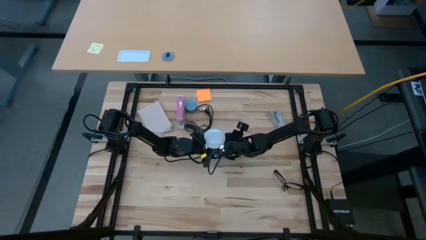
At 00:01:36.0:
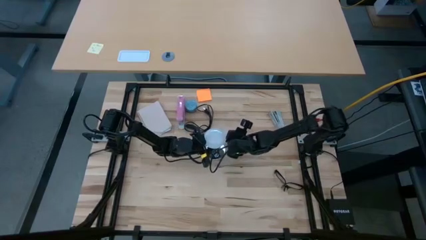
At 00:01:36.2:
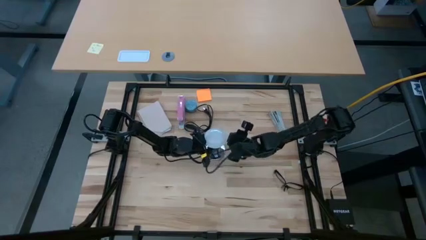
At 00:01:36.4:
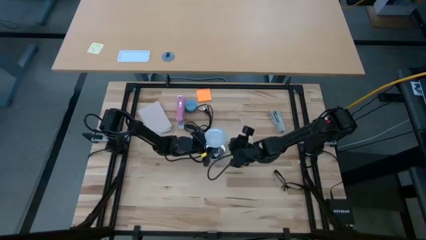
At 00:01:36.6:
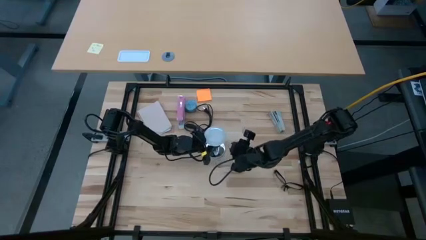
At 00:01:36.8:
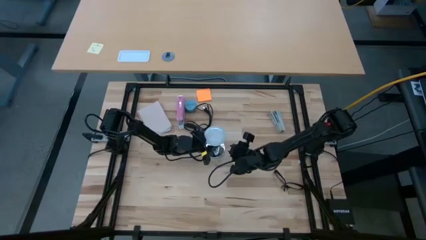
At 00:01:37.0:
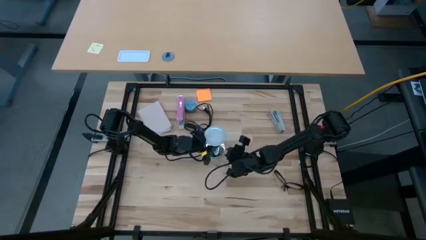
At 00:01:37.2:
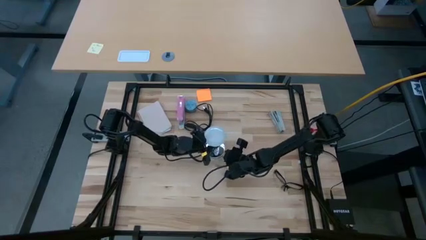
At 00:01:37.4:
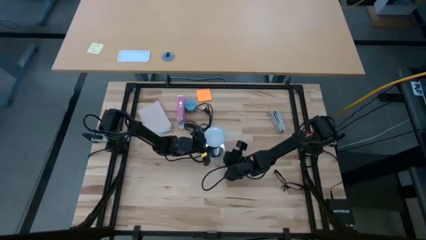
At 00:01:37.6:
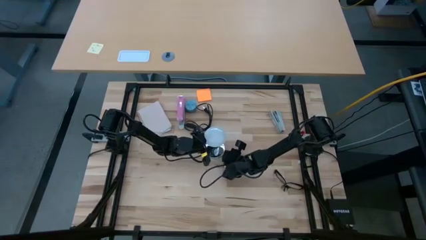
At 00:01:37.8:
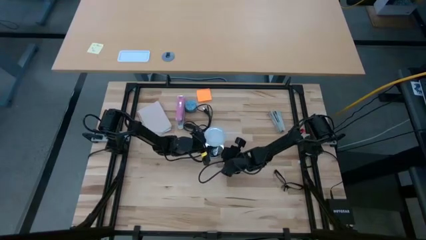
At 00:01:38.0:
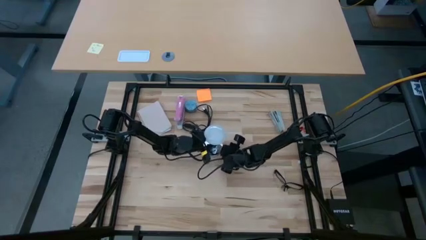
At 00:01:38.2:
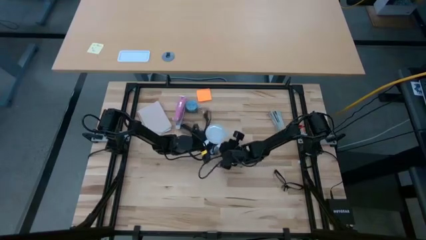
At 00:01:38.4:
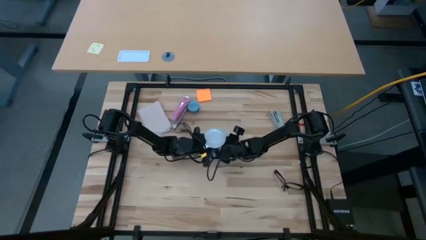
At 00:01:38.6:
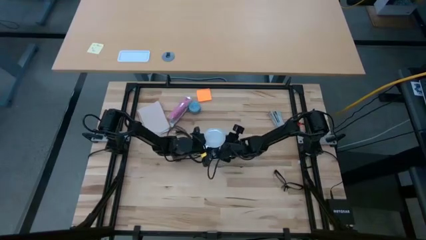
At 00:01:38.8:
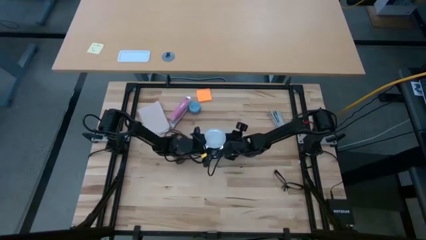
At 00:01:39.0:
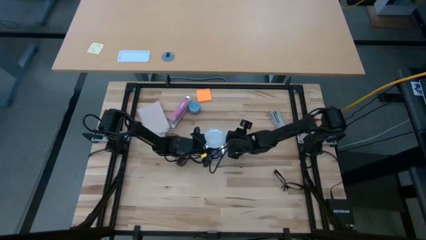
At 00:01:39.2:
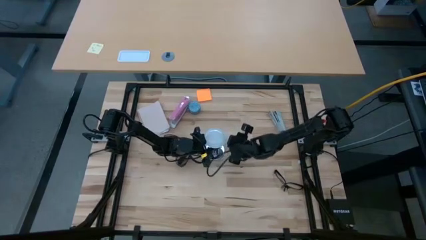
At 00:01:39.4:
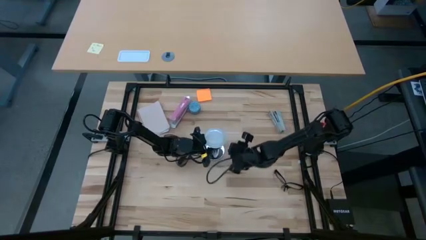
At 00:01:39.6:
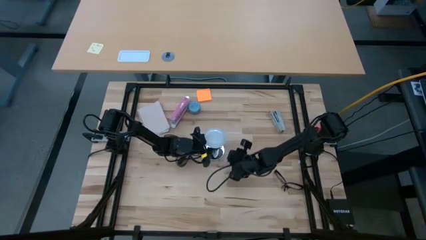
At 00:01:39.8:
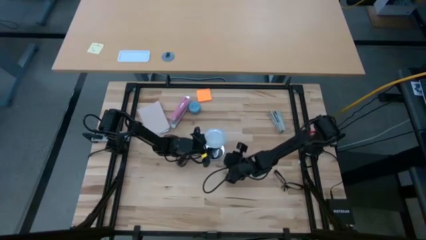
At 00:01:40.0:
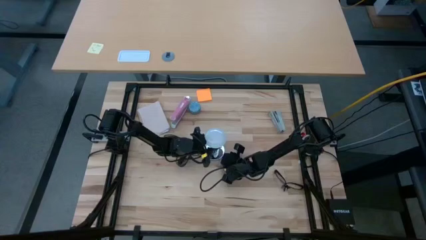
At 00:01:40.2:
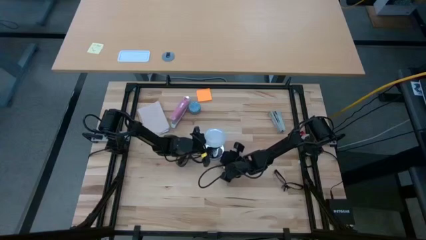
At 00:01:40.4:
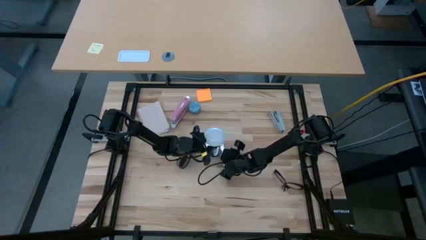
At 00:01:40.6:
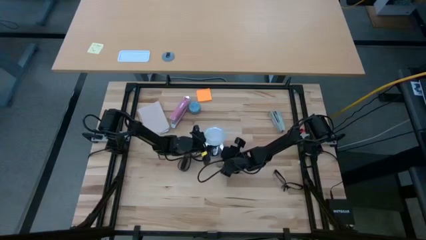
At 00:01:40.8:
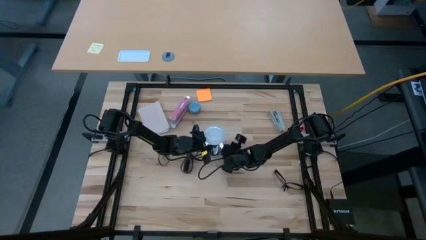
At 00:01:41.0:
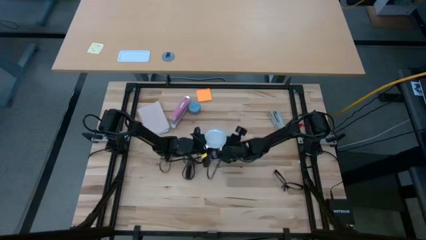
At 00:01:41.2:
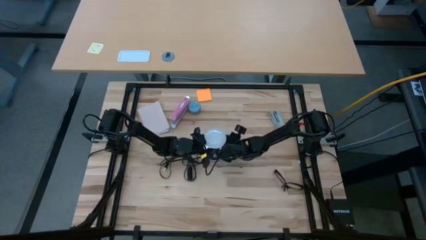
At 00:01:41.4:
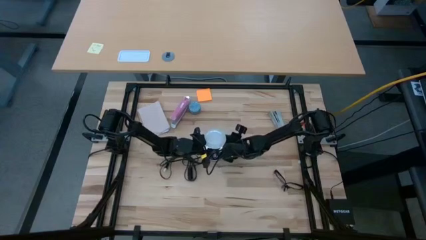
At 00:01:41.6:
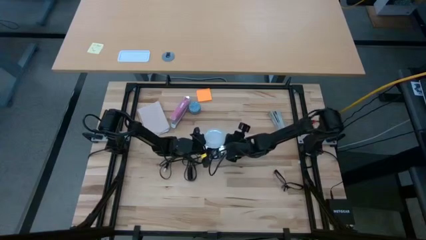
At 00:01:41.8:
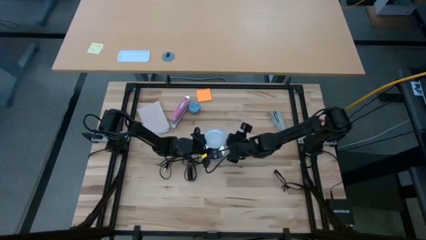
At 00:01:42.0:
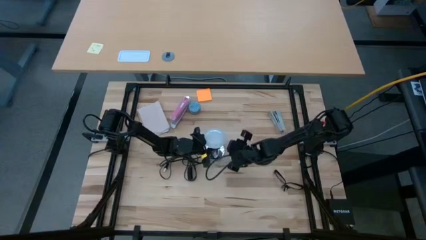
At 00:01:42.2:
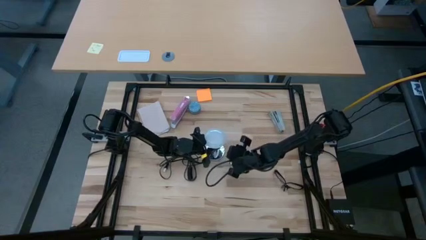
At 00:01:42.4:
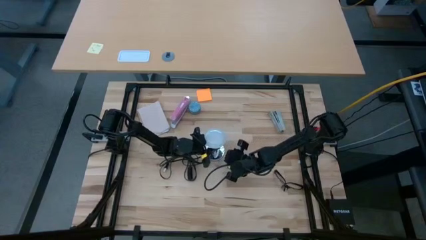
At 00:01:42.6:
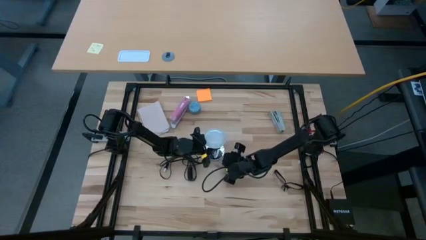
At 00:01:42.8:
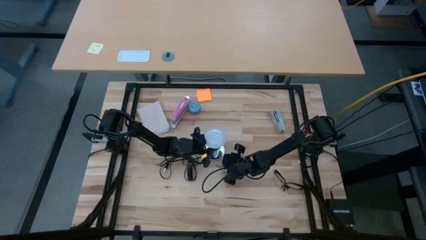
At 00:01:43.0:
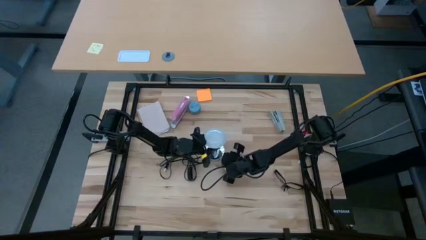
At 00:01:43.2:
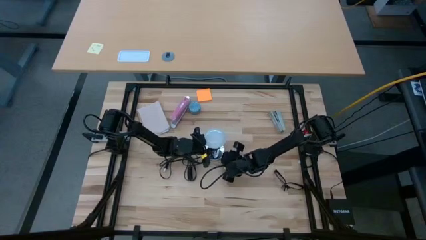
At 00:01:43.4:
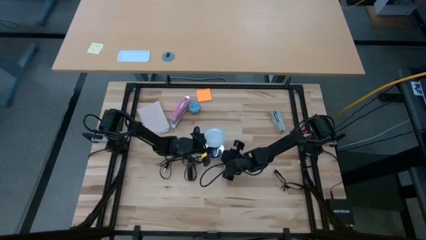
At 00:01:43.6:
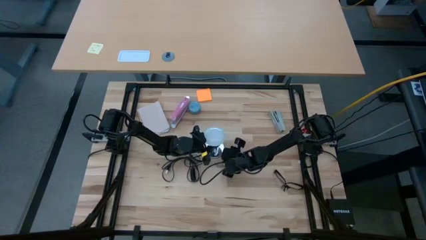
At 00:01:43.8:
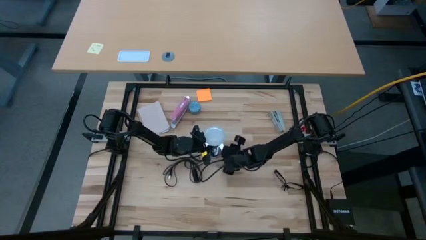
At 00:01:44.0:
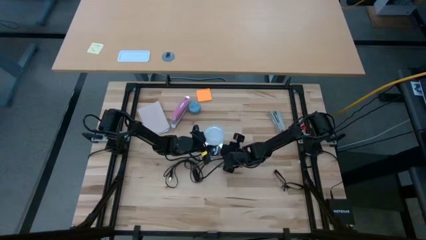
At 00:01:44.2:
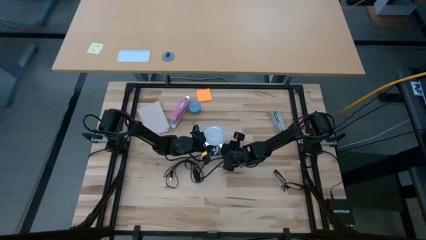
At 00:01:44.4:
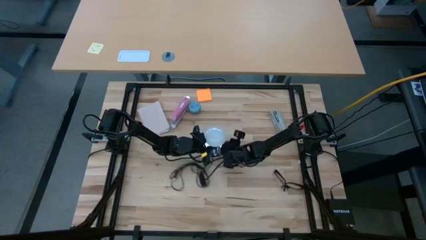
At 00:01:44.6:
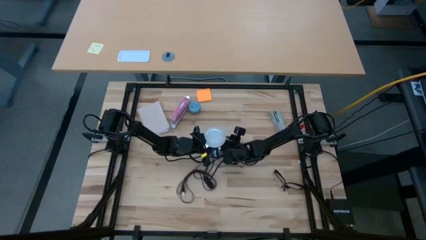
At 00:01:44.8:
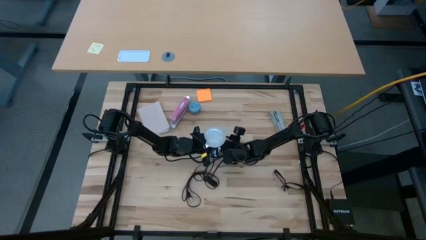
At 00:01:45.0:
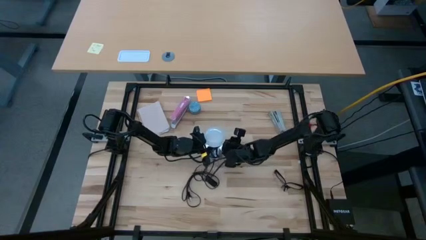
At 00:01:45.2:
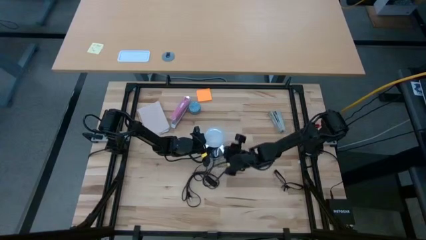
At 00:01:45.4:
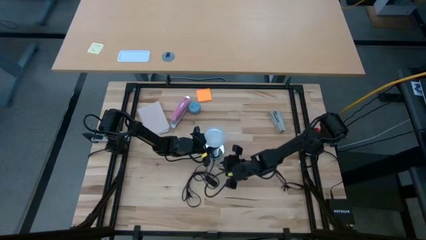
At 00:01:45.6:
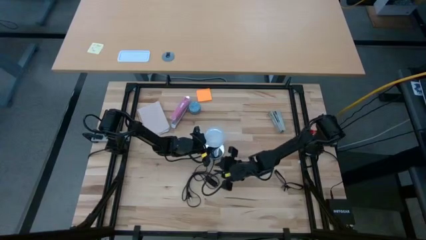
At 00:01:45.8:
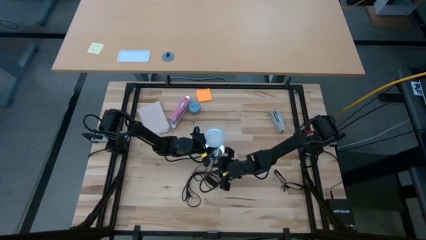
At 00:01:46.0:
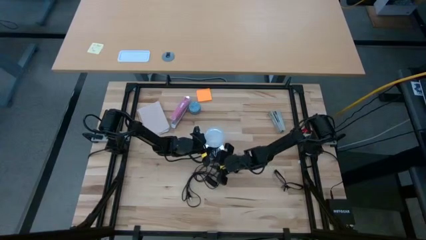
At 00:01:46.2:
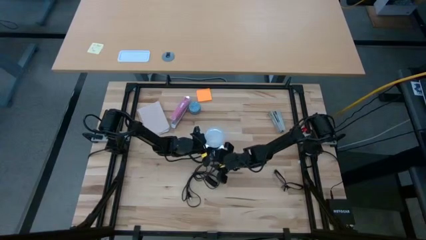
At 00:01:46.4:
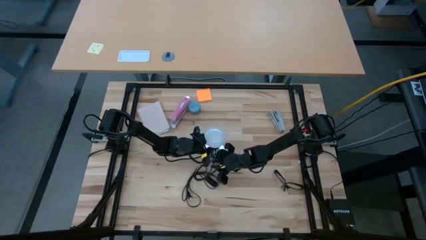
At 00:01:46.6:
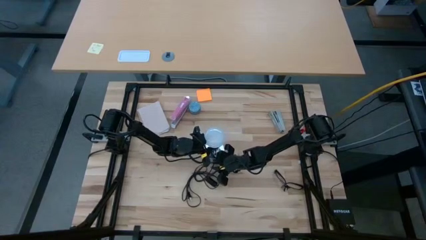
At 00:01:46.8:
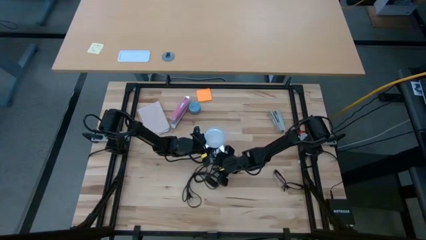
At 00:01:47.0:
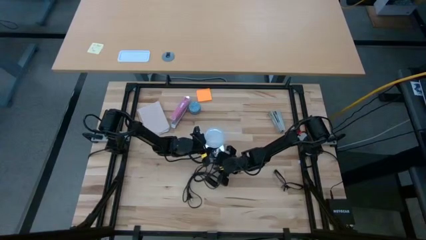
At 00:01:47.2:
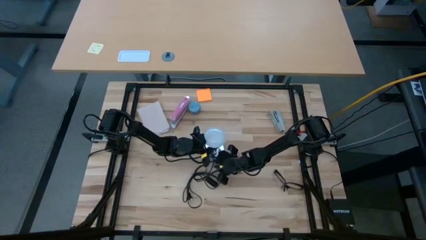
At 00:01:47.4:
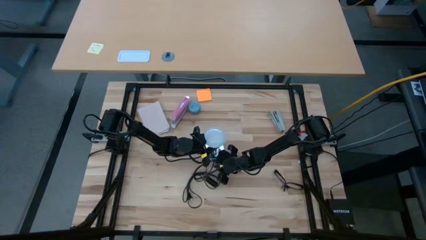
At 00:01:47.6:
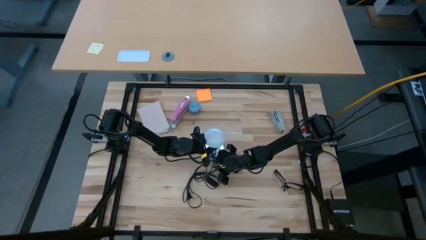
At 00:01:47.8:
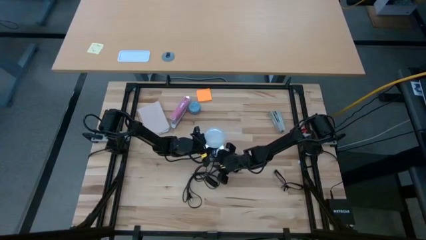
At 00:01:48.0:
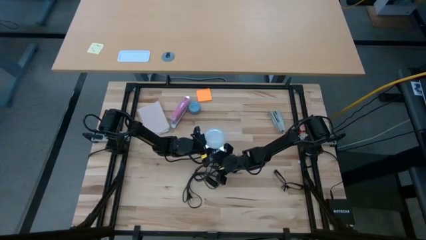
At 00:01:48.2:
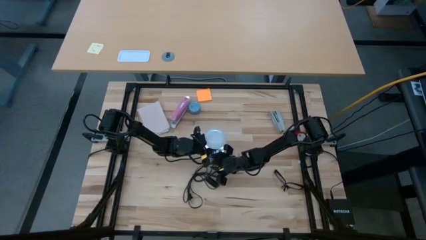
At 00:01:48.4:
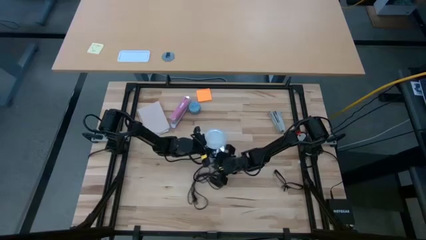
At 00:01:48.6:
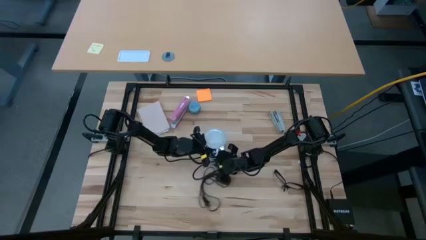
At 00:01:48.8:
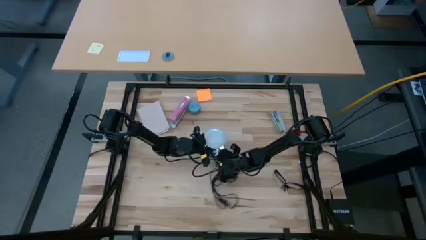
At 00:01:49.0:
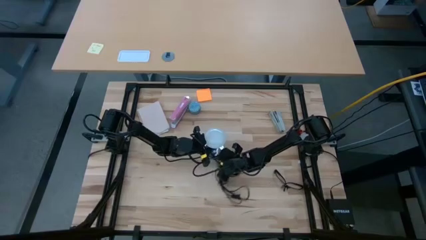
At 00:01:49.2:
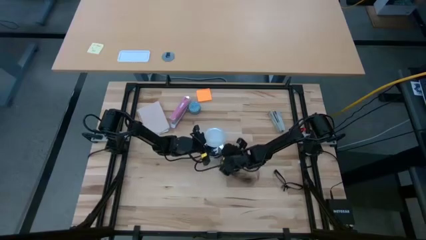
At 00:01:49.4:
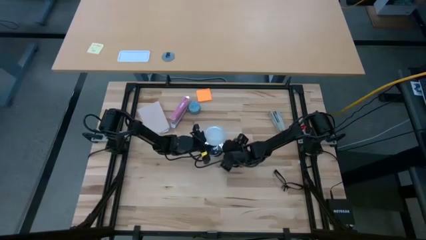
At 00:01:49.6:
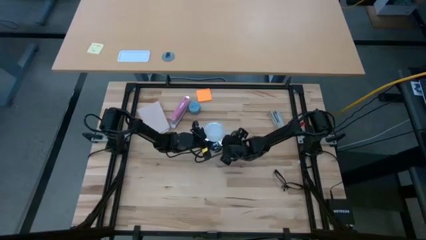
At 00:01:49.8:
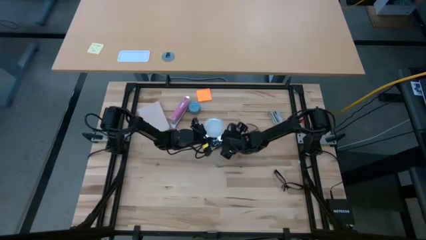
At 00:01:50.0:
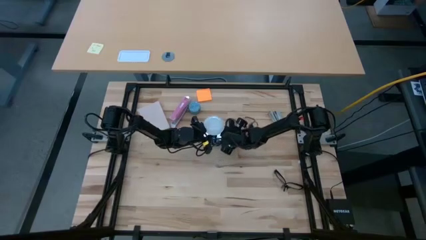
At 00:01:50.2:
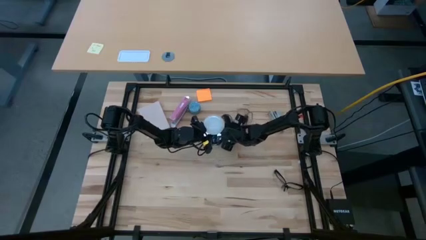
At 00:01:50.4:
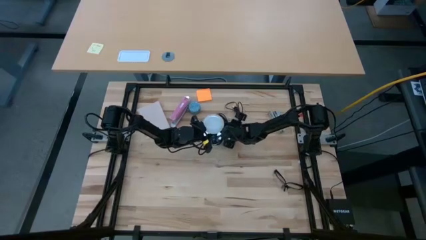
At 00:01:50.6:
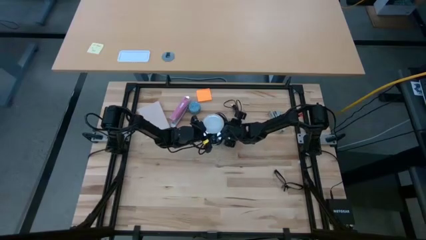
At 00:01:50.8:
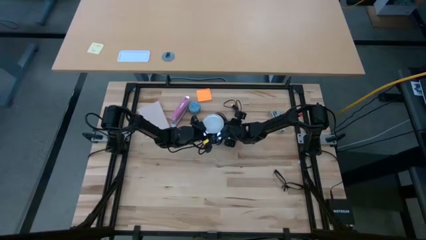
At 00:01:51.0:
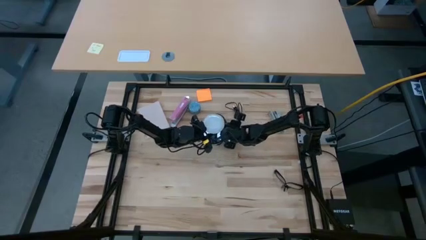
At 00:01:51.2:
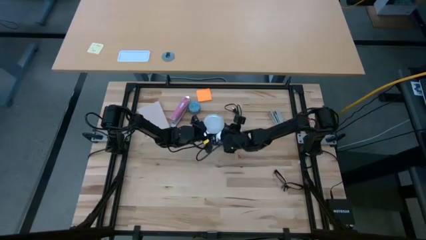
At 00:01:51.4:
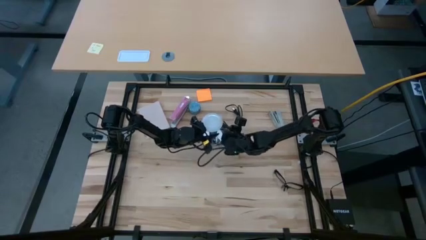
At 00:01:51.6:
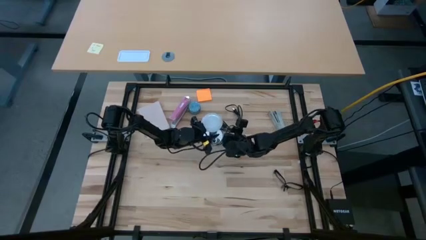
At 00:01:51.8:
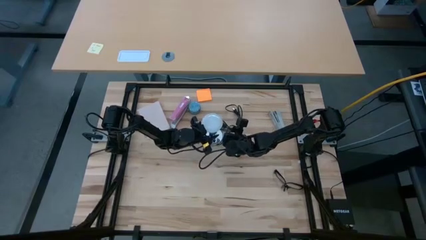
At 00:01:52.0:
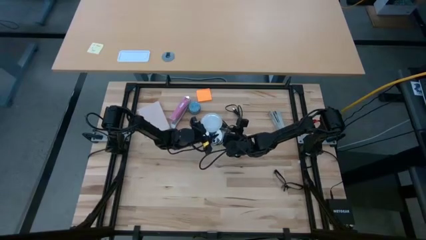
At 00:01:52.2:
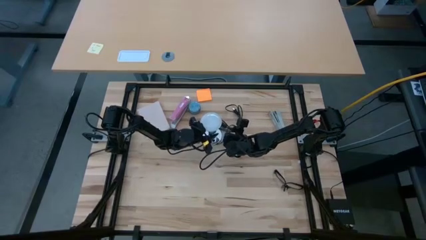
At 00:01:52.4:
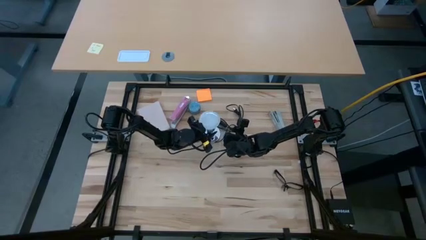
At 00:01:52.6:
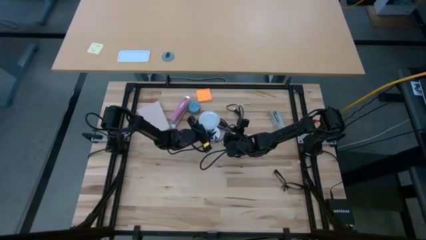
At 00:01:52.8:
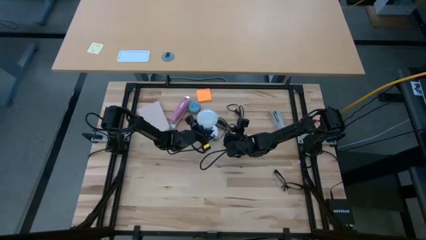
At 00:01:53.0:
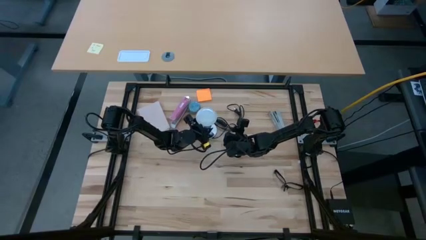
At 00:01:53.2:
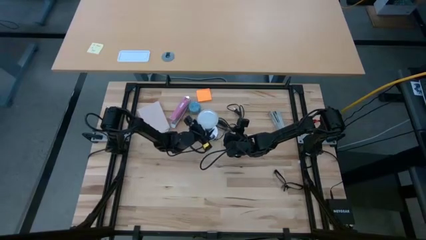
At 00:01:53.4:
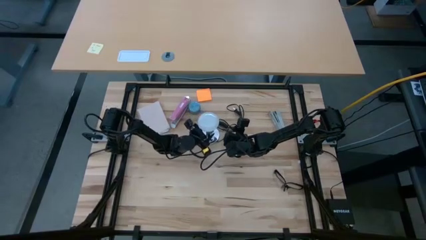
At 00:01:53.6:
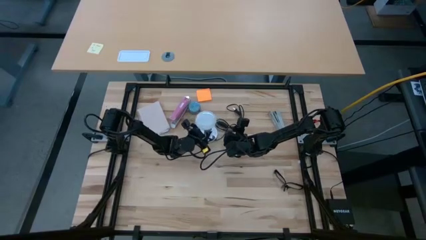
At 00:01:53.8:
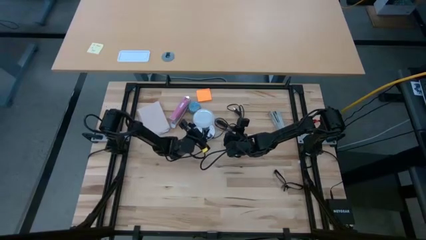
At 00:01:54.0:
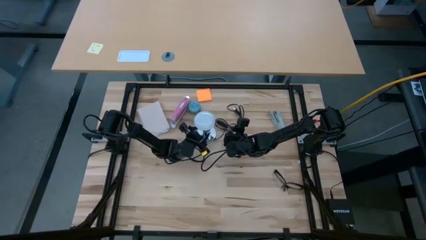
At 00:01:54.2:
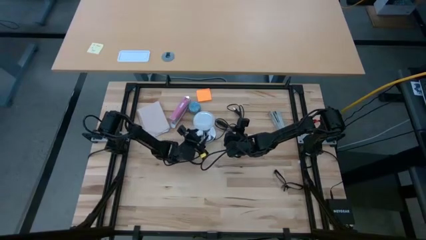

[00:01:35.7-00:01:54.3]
Task: Screw lightbulb
Insert the lightbulb into the lamp
